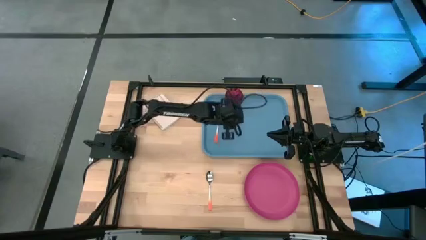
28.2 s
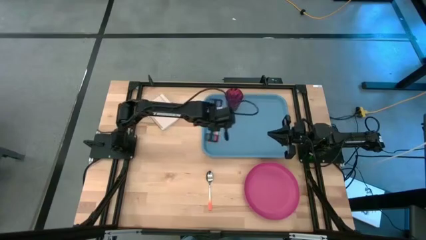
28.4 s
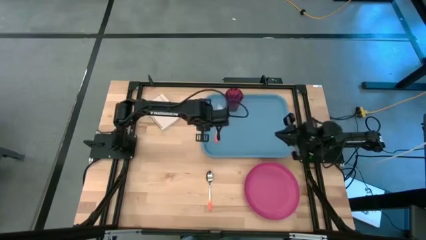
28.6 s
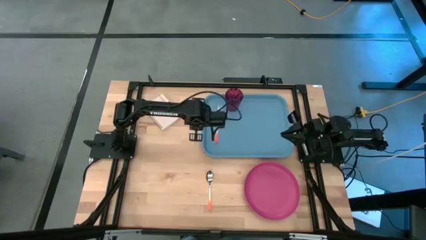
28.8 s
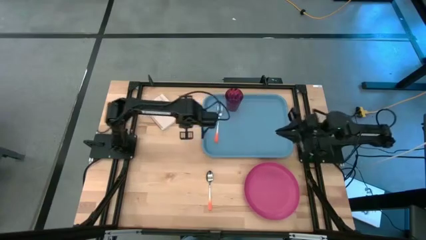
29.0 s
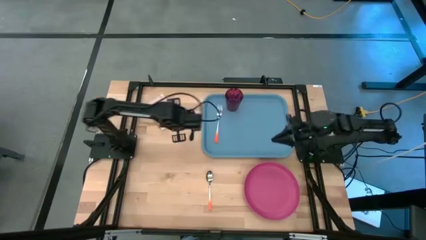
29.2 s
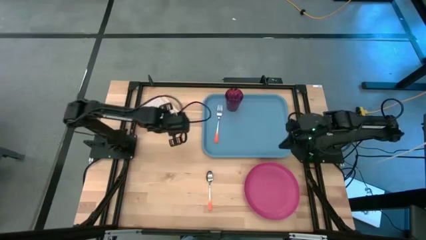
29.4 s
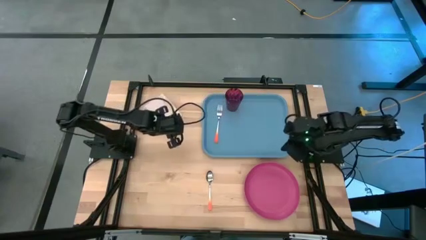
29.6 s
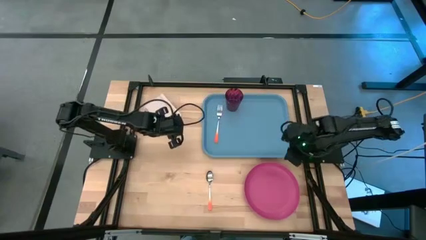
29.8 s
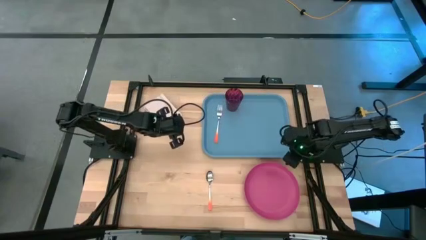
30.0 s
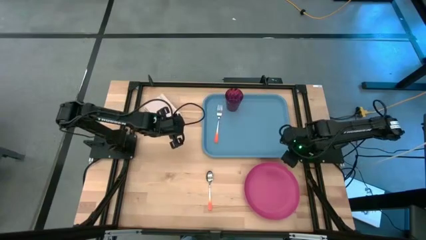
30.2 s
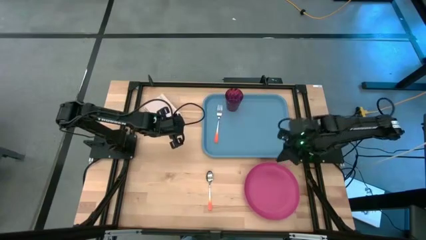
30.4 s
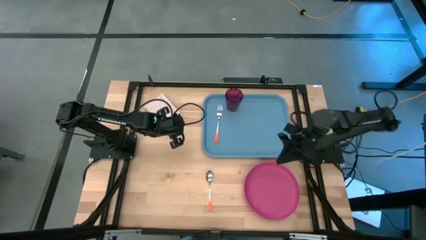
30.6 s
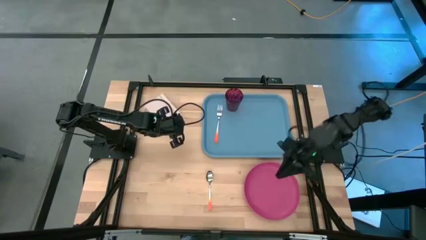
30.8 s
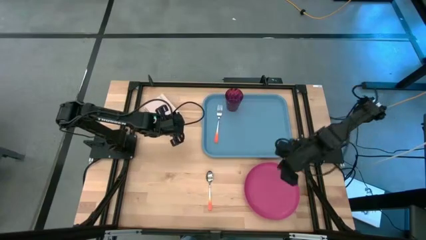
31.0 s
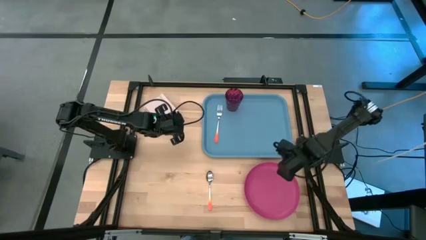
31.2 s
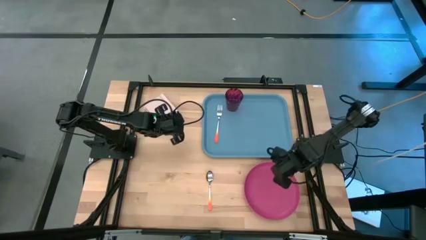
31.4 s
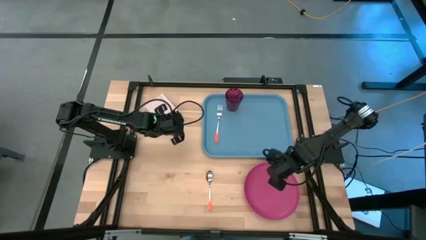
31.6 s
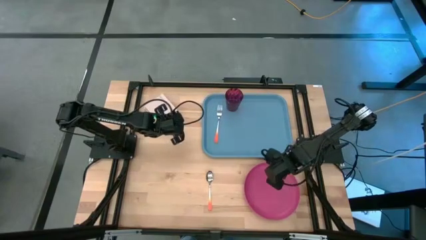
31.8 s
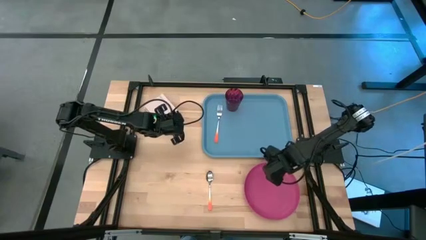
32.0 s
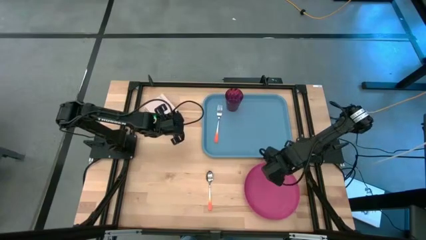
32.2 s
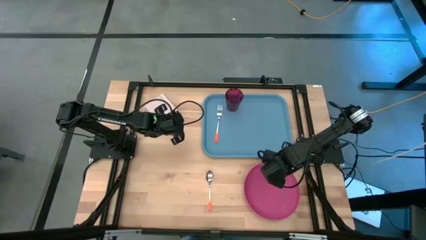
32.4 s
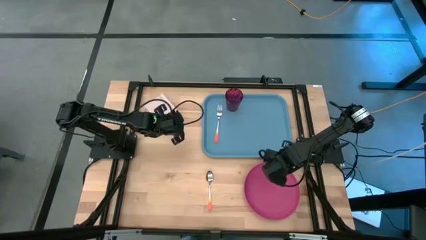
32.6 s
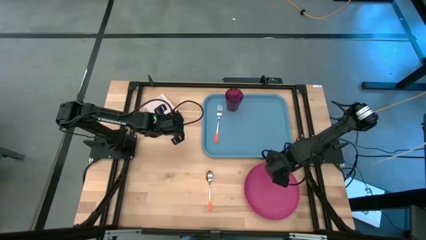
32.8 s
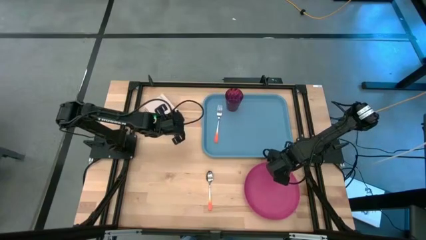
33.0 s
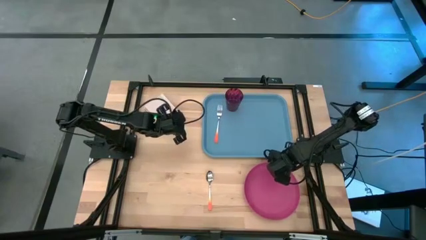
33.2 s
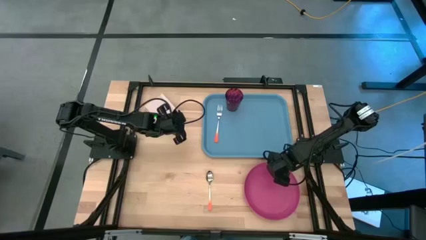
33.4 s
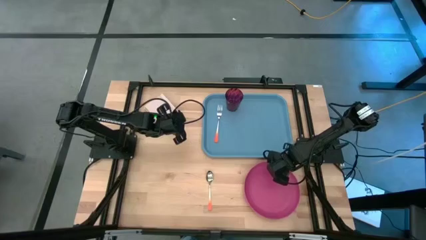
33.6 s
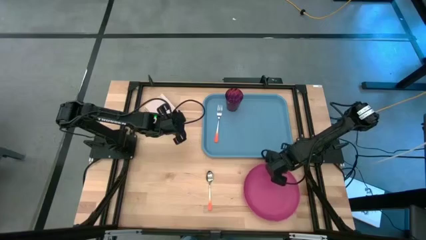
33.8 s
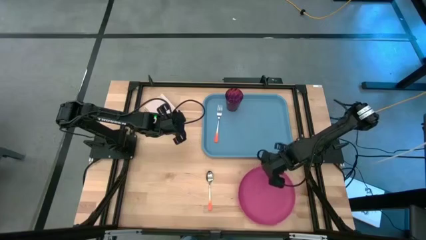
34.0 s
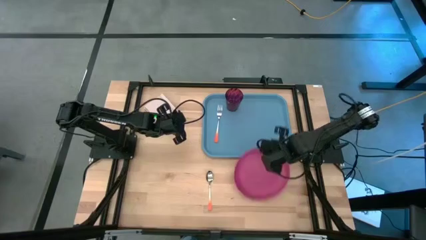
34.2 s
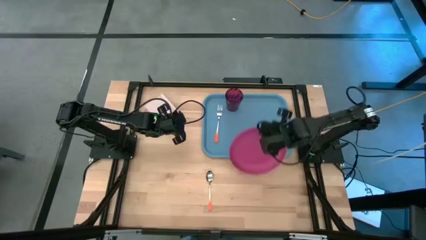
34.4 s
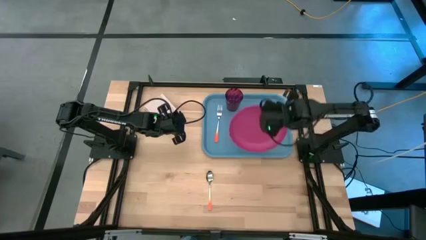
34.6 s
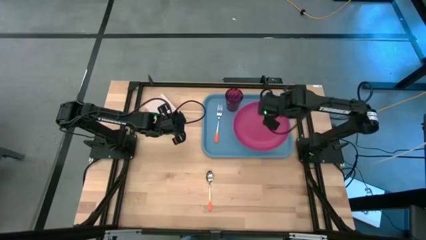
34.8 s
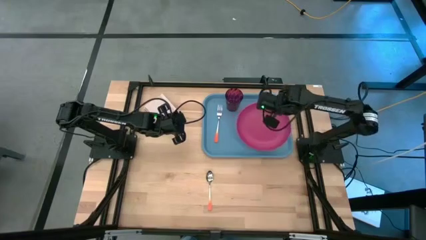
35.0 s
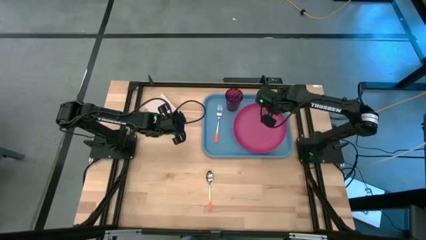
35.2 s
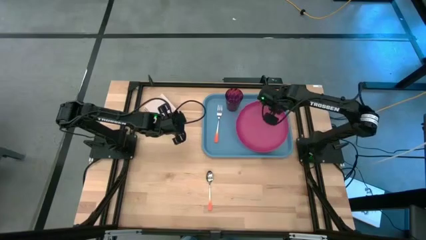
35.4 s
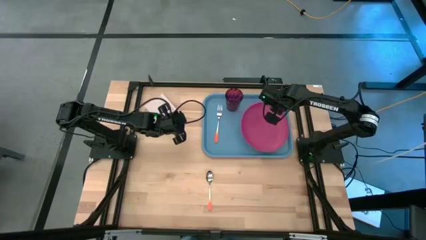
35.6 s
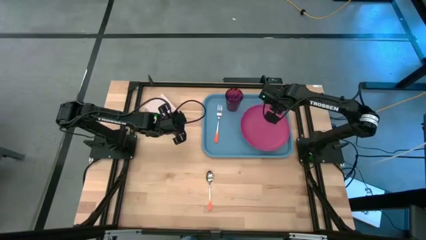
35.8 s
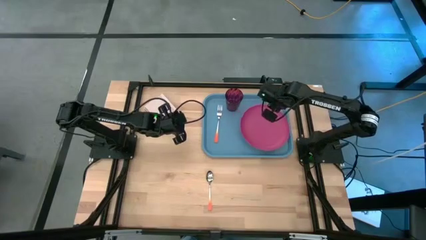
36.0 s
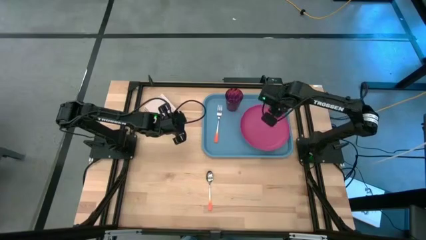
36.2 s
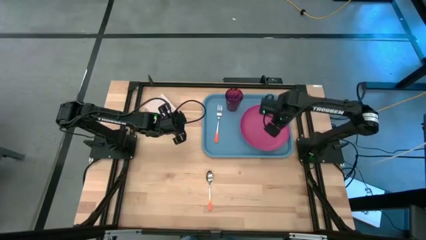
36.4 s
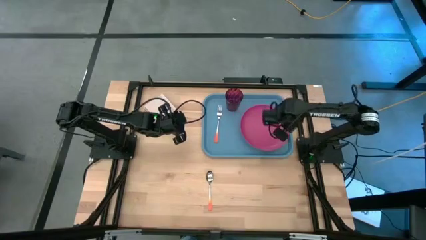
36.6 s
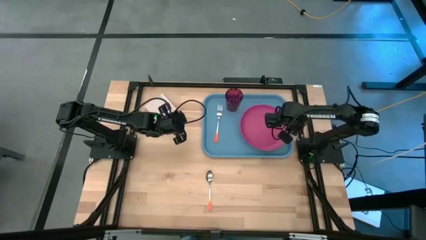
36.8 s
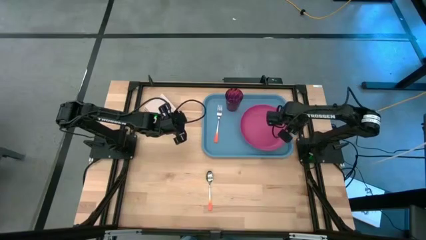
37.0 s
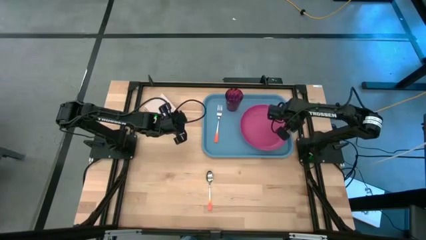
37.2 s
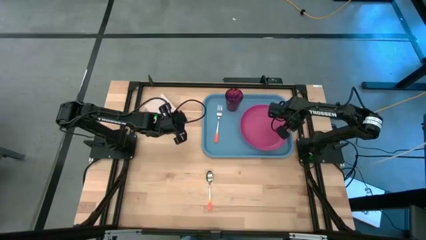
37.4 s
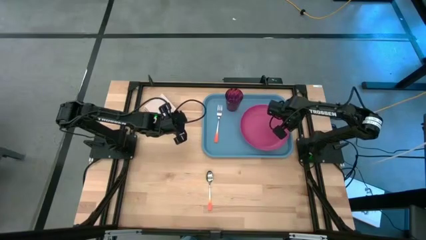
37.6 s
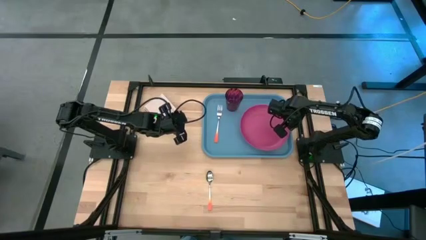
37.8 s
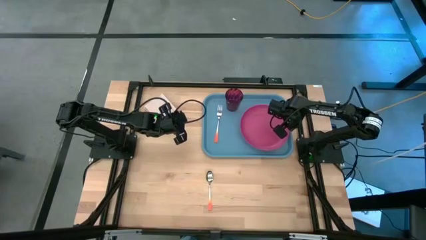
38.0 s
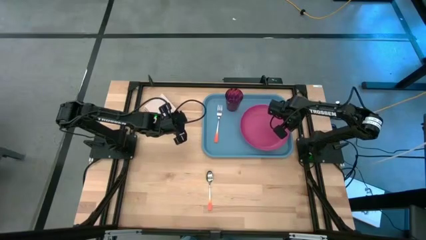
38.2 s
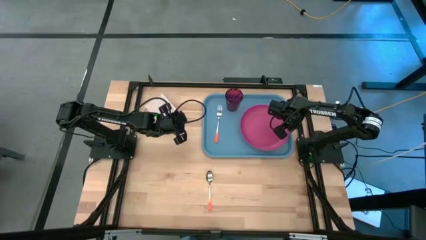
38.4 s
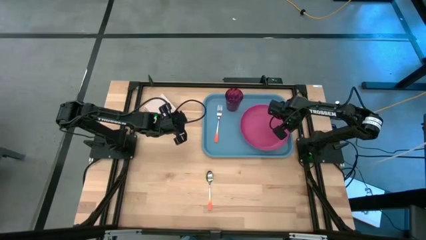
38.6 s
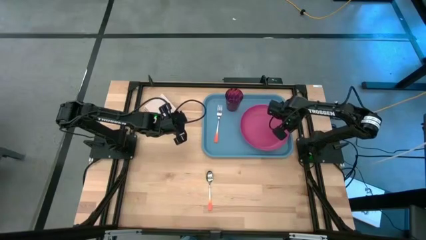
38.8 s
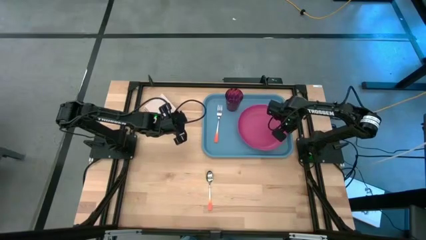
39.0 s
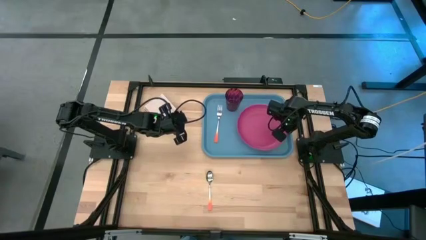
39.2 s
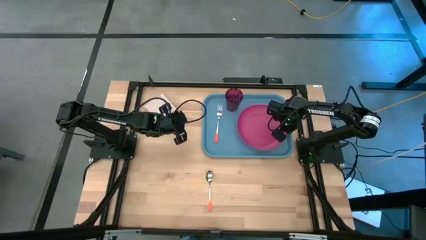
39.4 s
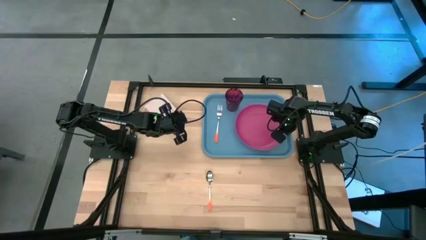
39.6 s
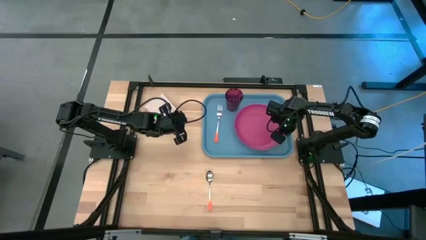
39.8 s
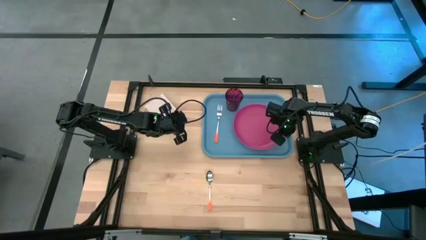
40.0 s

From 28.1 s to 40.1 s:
Task: Pick and place plate/cup/fork/spoon on tray
Put the pink plate on the blue tray to the bottom right of the red cup

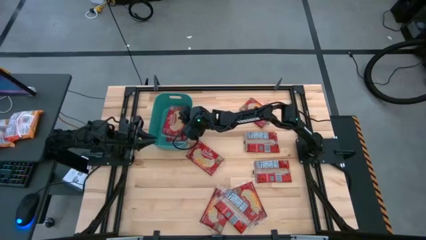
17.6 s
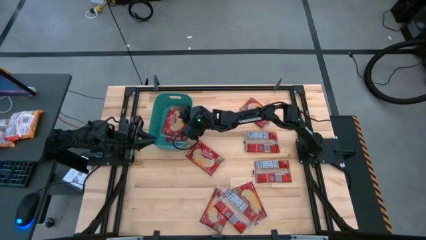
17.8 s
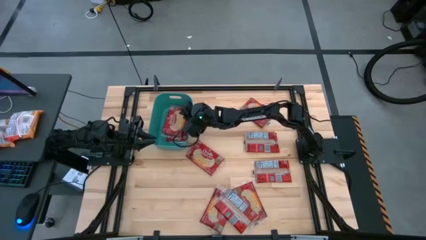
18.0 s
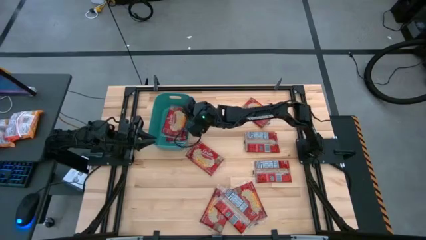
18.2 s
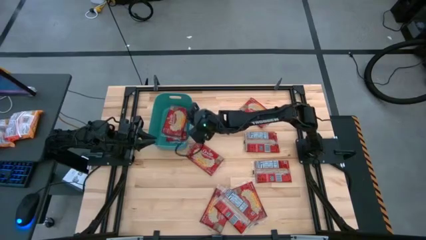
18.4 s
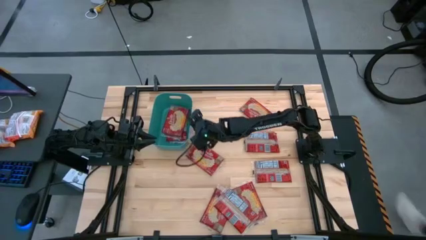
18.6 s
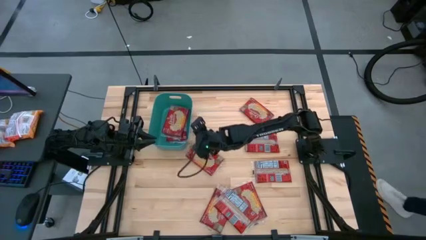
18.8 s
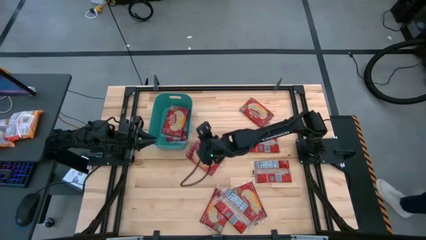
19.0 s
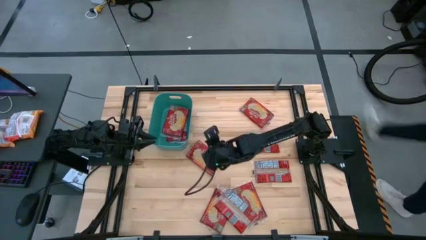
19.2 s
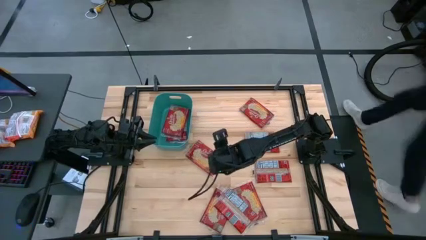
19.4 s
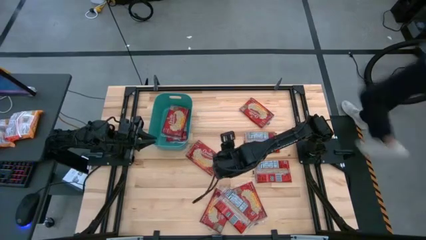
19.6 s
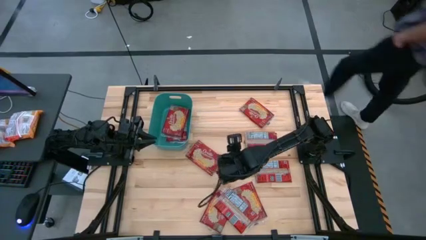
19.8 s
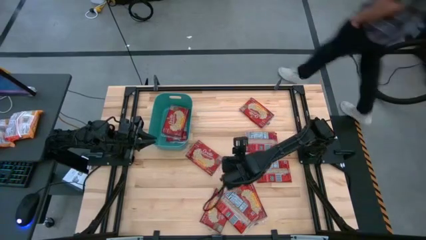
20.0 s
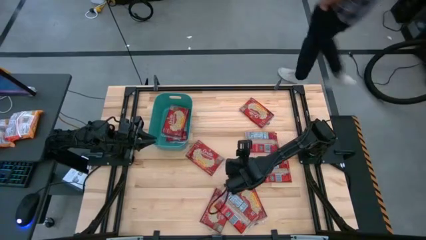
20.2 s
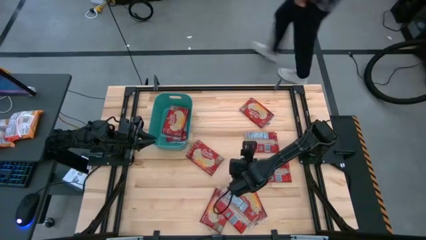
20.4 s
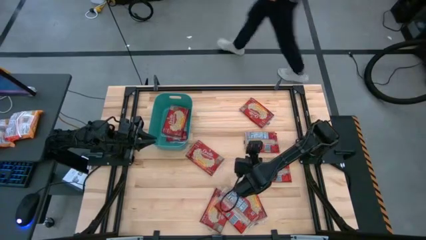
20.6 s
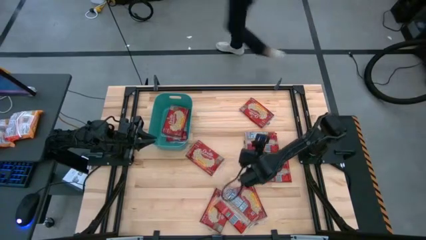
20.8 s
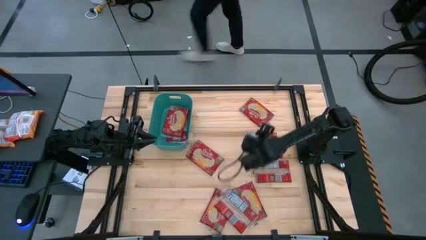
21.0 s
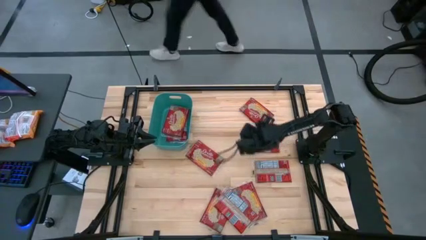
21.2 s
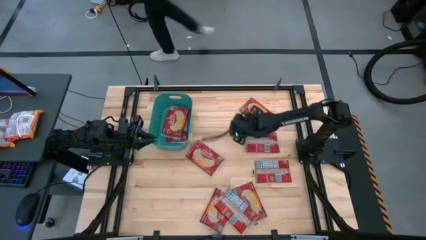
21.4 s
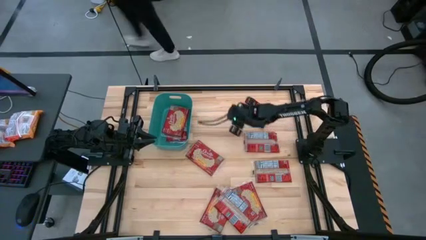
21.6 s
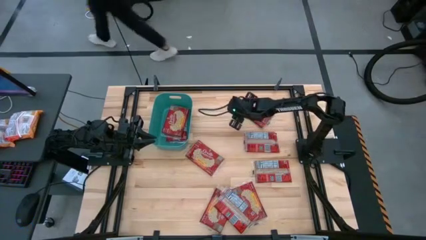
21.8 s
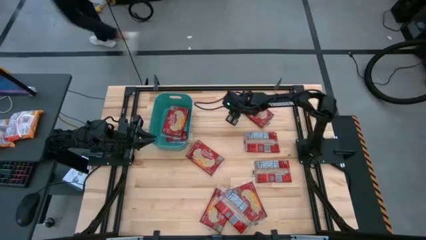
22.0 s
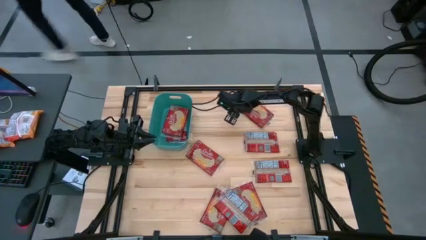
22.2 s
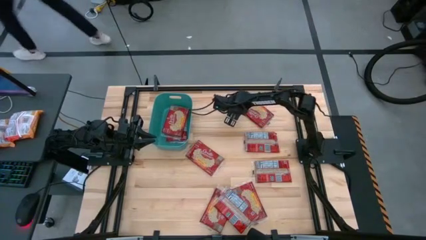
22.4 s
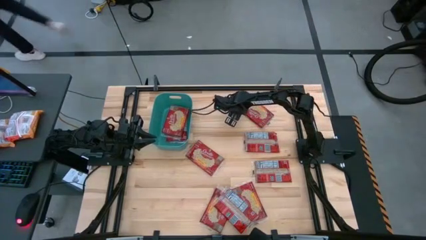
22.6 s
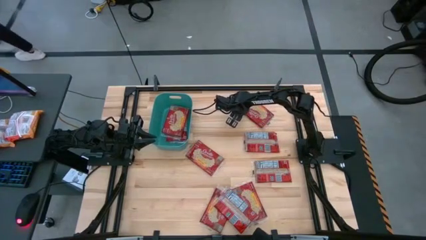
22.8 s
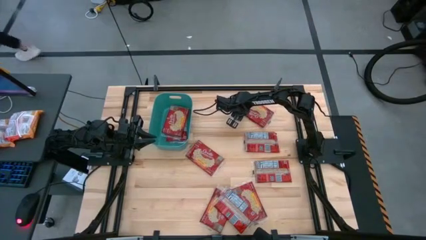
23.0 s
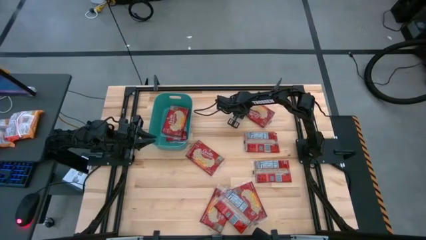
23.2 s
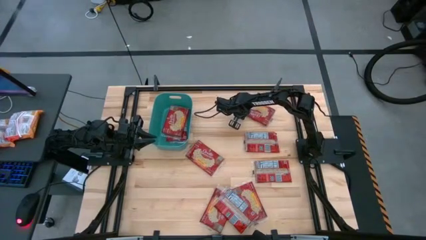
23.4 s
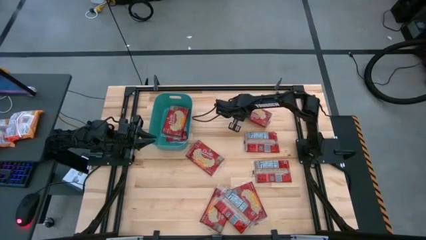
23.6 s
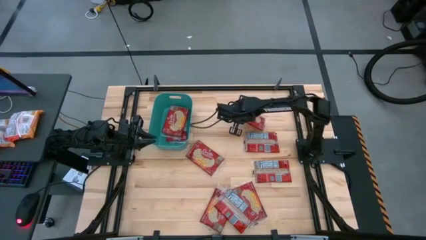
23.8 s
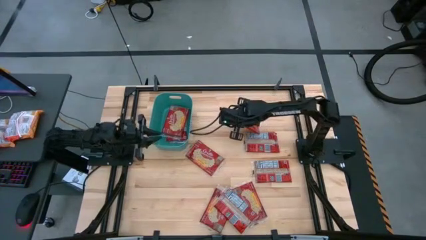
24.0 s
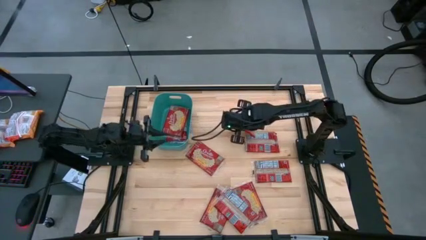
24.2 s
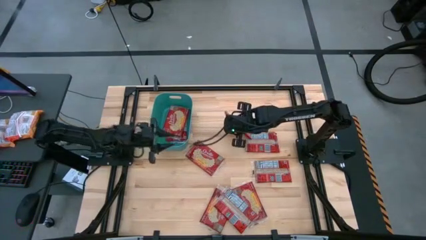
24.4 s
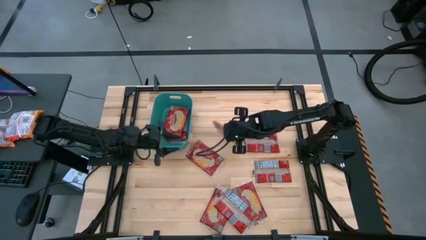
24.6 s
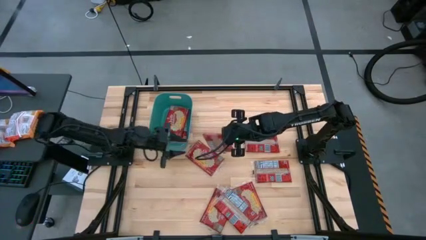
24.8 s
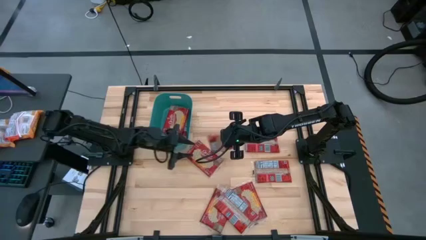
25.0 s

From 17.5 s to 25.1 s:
Task: Sort popcorn bags into baskets
Put the red popcorn bag into the green bin
